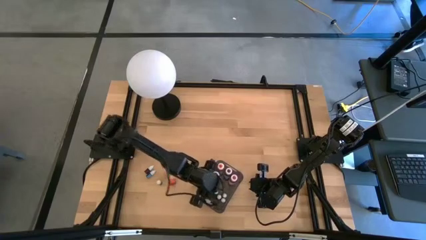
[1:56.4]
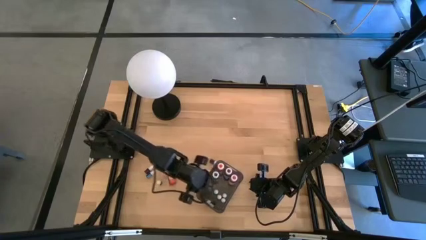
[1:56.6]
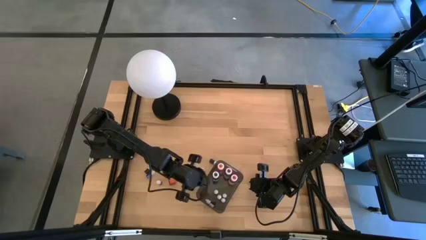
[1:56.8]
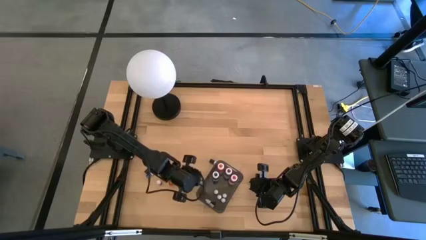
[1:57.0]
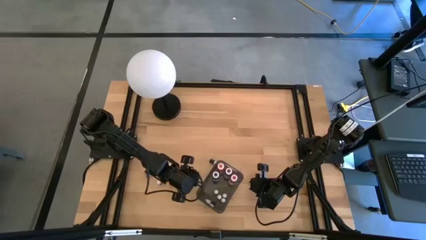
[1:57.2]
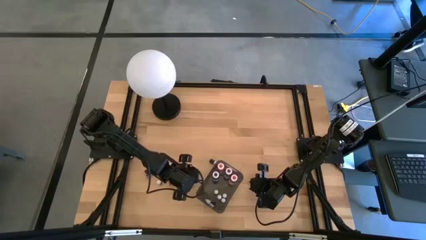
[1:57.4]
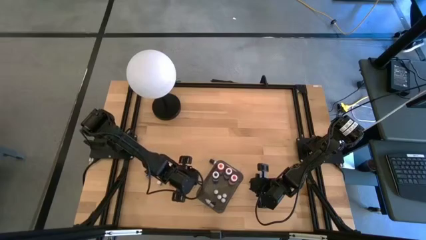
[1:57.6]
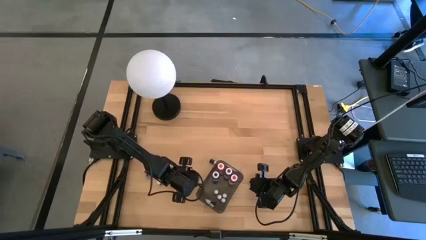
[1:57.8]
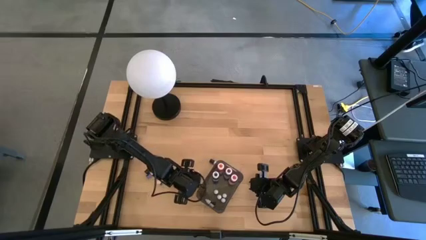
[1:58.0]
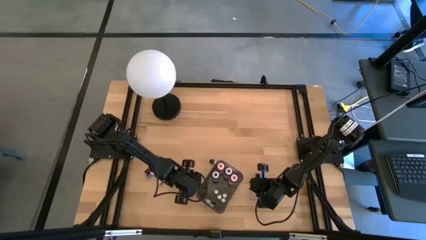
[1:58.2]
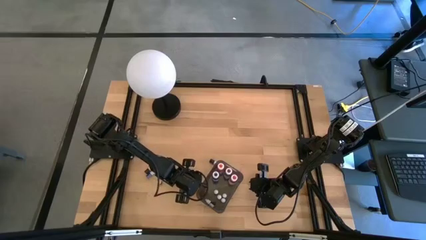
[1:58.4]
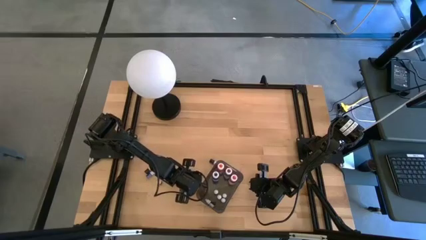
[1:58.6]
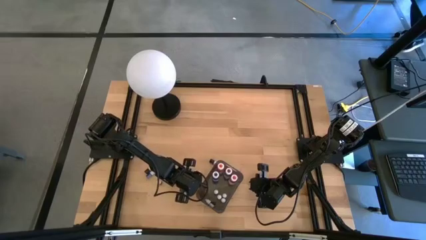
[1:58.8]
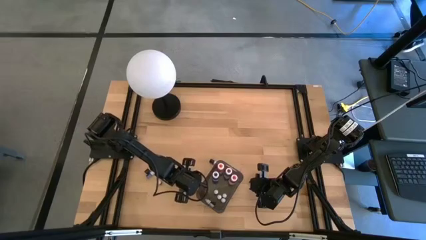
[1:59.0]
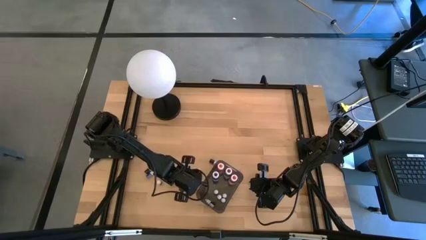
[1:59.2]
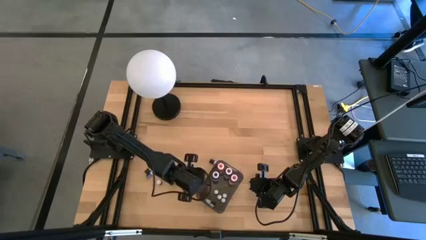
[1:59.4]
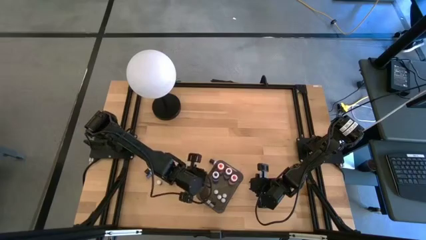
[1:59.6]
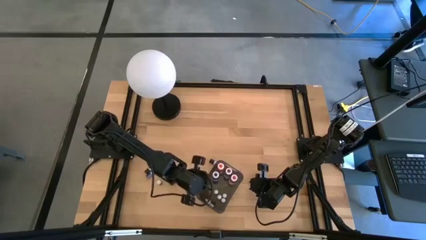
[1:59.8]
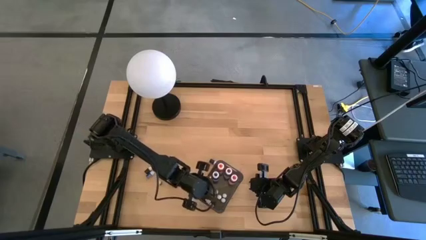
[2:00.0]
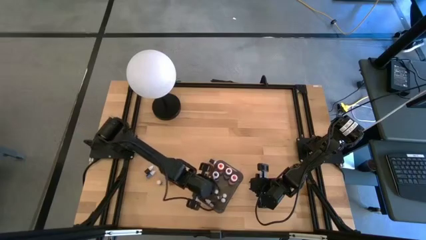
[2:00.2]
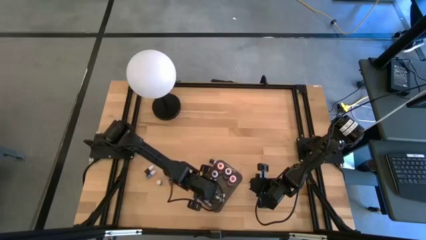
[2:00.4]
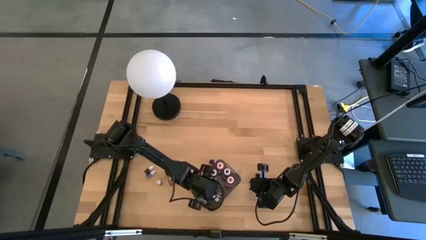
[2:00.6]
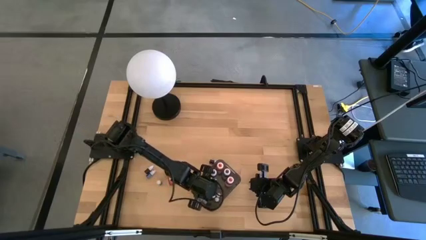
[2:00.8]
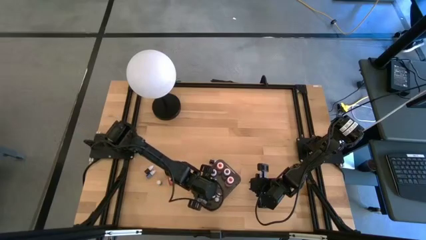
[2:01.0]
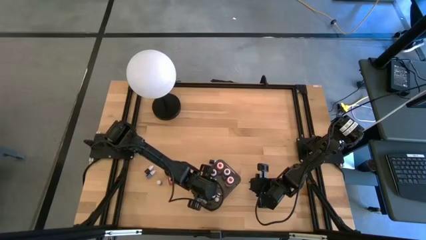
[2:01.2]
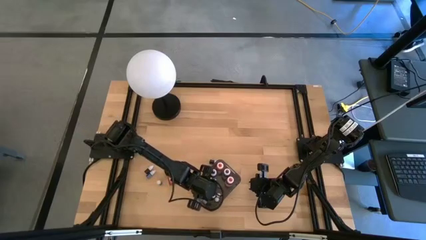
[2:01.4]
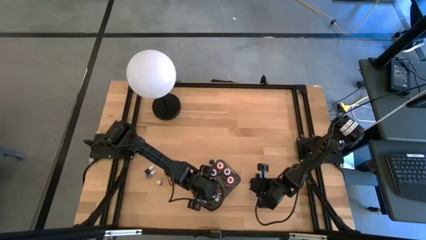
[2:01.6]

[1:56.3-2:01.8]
Task: Pick & Place food coloring
Put the small food coloring bottle into the black bin

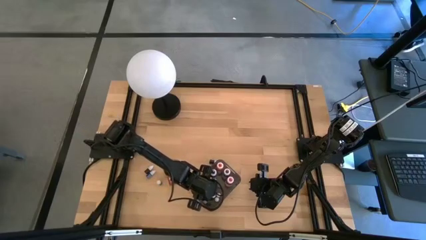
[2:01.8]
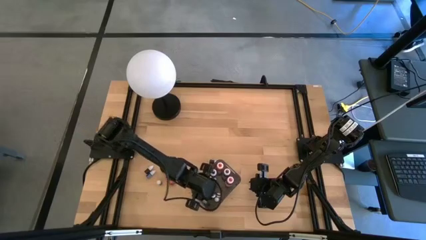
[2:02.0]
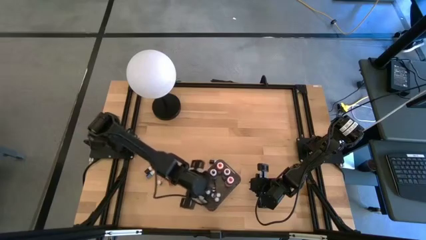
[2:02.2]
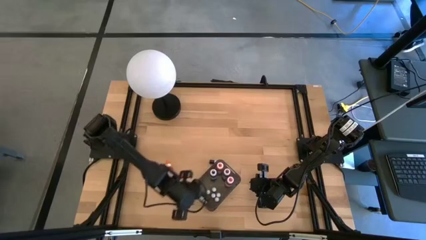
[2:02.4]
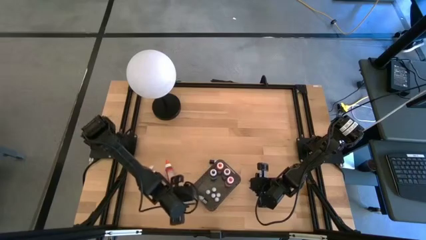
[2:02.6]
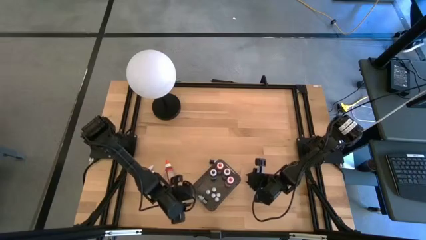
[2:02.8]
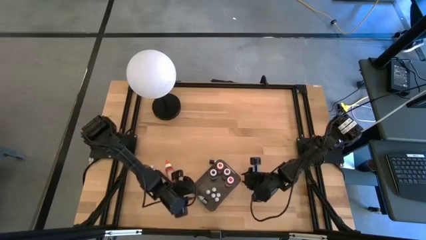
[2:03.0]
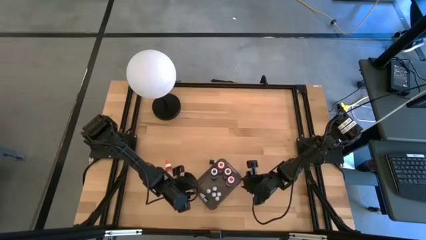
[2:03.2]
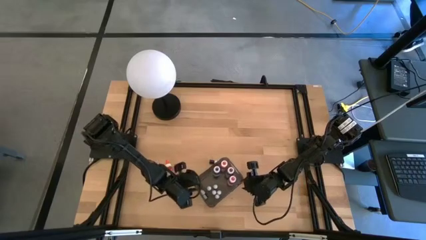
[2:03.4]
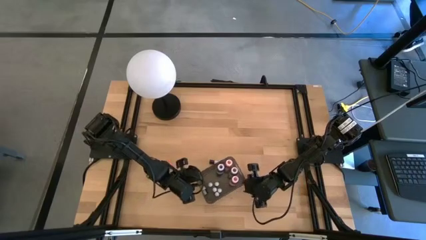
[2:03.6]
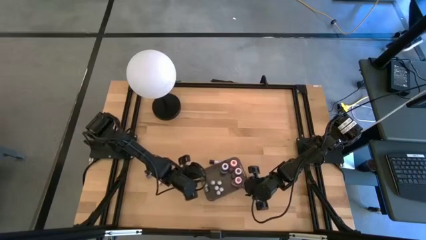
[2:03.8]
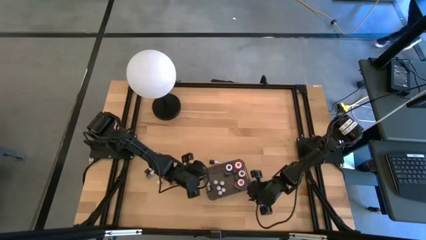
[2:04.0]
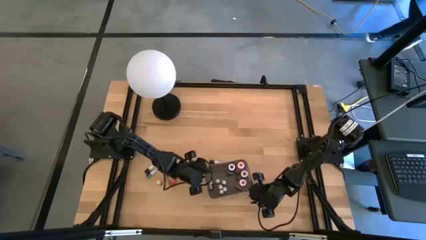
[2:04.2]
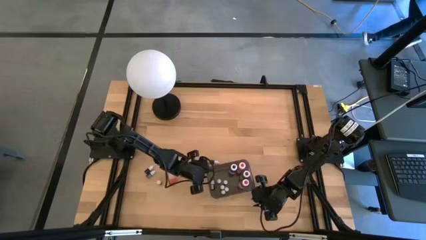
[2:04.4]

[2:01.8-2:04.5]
Adjust the black bin on the table

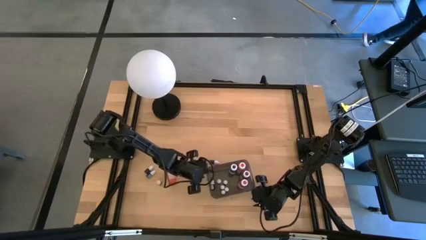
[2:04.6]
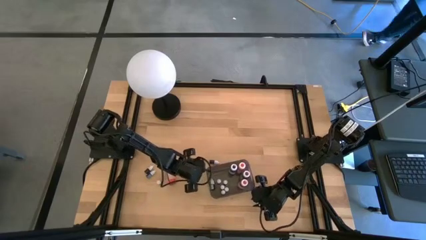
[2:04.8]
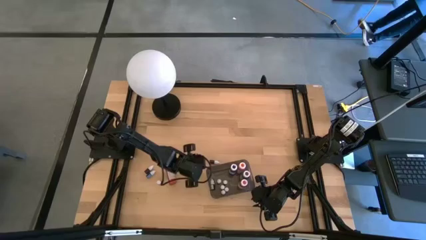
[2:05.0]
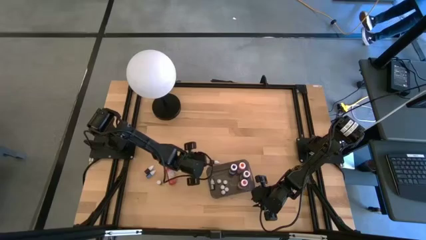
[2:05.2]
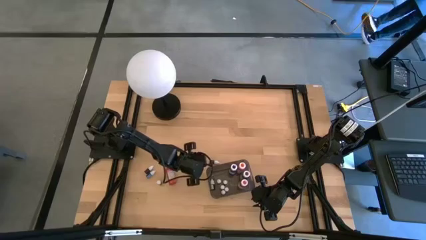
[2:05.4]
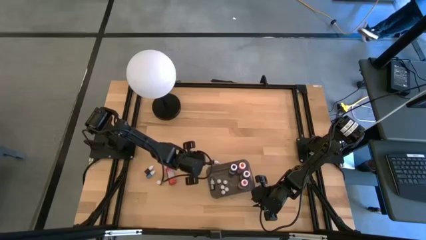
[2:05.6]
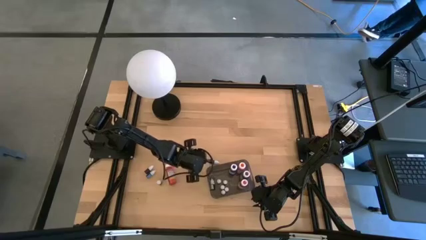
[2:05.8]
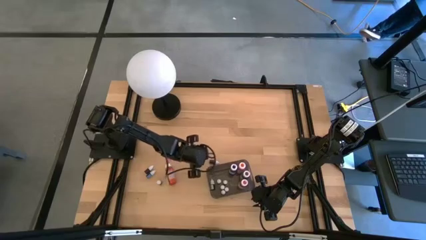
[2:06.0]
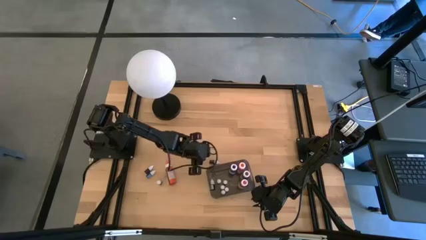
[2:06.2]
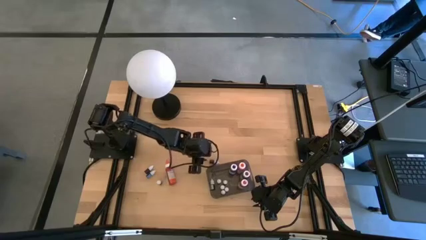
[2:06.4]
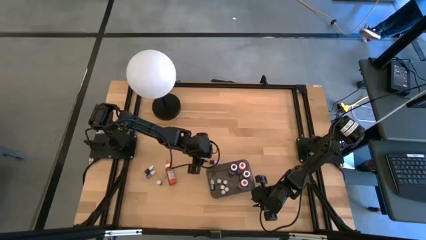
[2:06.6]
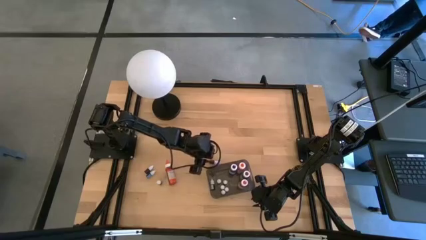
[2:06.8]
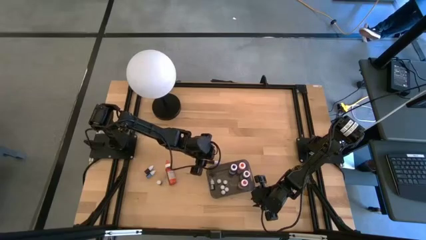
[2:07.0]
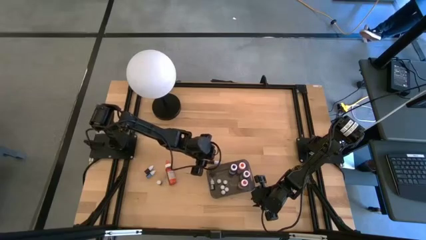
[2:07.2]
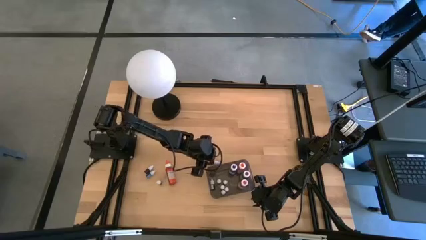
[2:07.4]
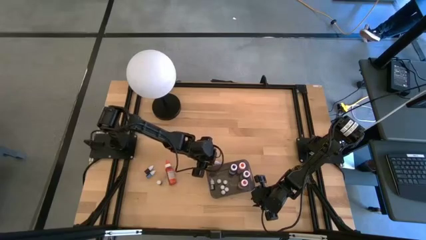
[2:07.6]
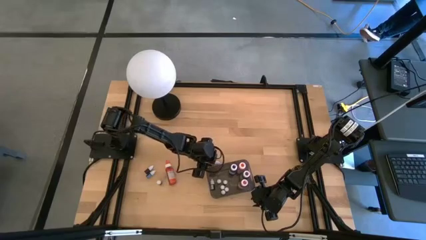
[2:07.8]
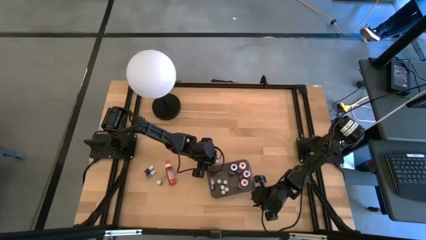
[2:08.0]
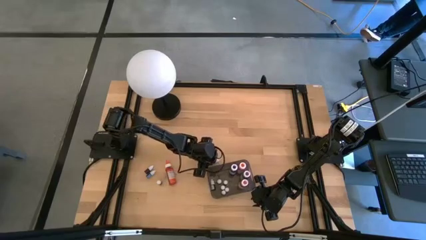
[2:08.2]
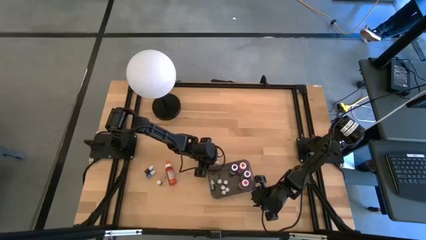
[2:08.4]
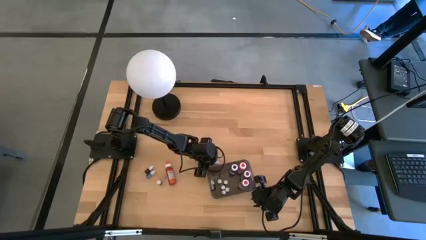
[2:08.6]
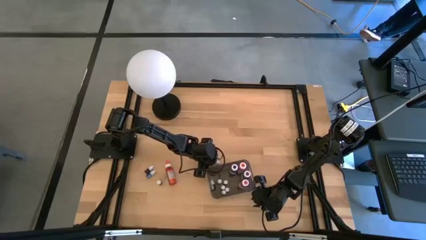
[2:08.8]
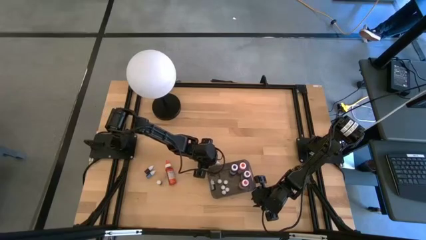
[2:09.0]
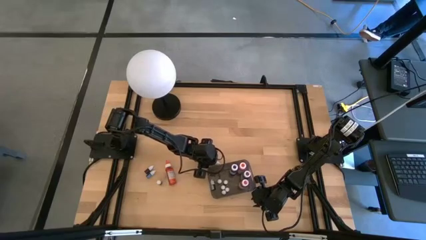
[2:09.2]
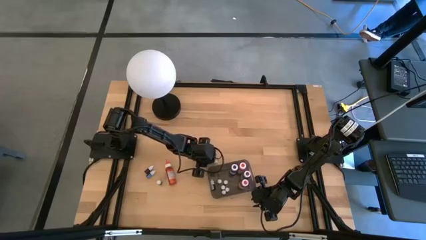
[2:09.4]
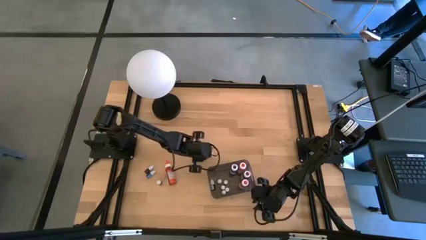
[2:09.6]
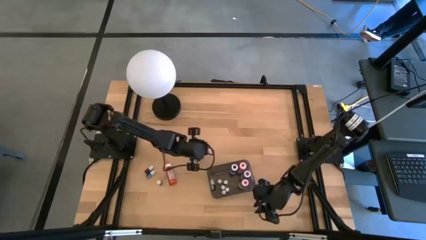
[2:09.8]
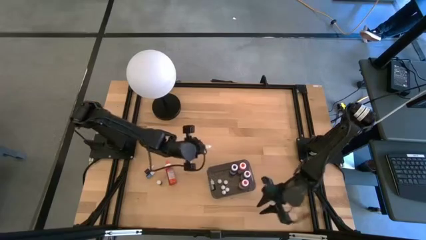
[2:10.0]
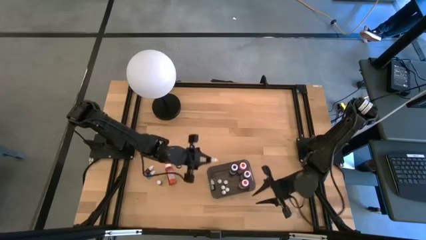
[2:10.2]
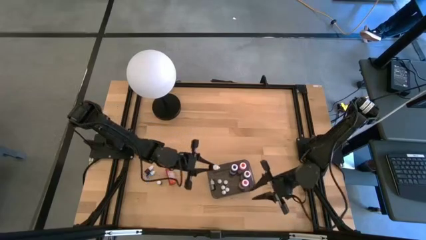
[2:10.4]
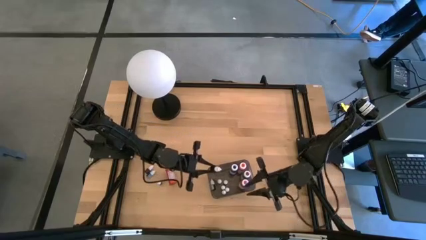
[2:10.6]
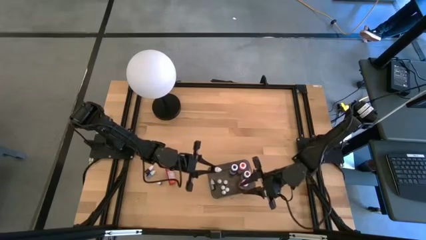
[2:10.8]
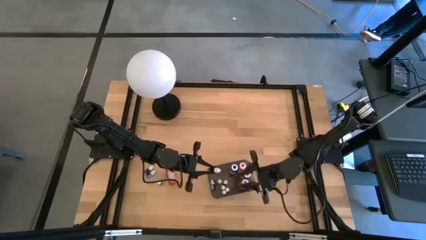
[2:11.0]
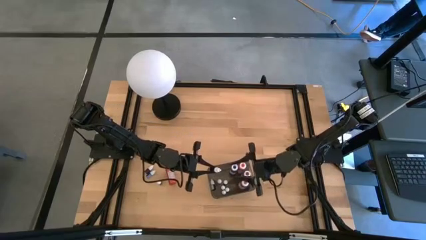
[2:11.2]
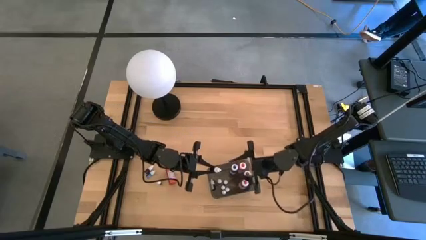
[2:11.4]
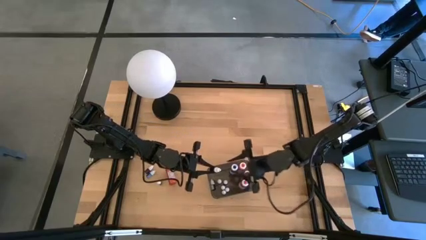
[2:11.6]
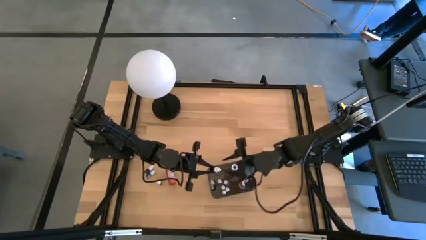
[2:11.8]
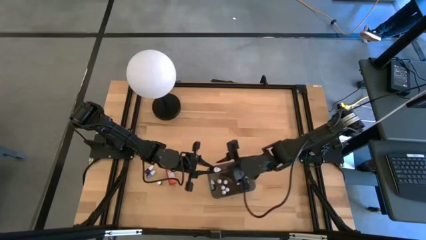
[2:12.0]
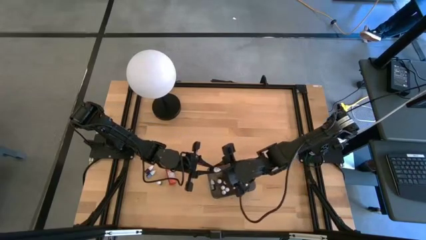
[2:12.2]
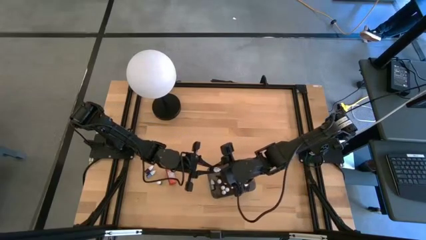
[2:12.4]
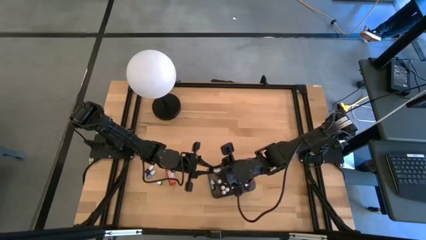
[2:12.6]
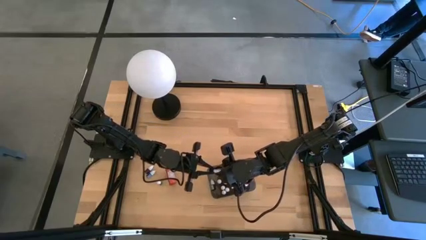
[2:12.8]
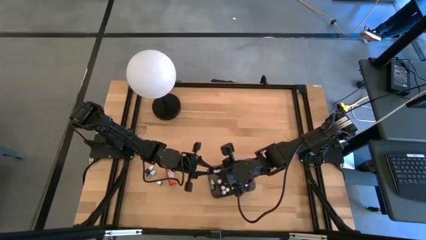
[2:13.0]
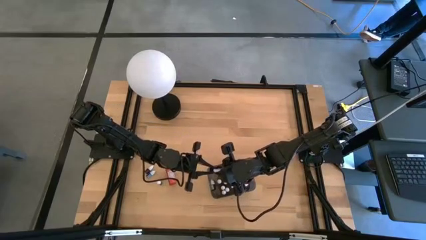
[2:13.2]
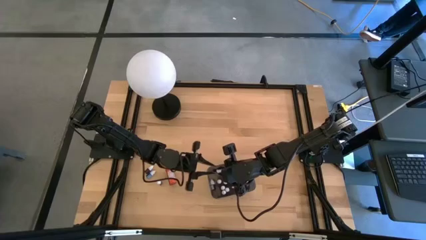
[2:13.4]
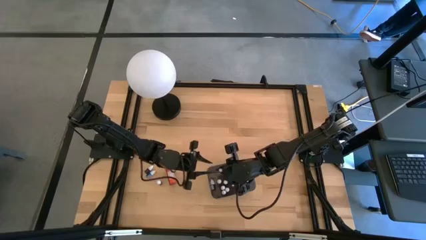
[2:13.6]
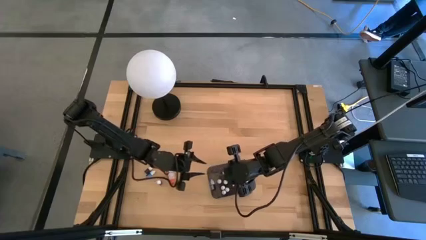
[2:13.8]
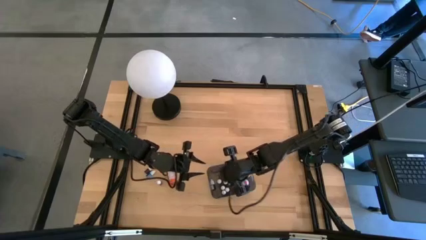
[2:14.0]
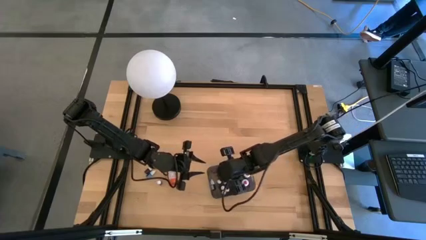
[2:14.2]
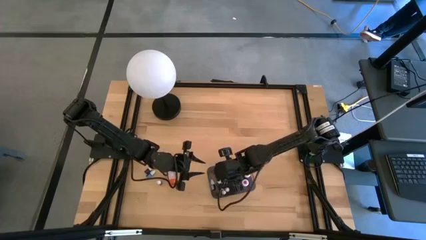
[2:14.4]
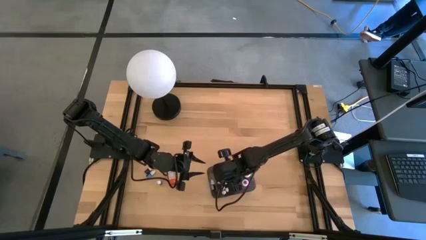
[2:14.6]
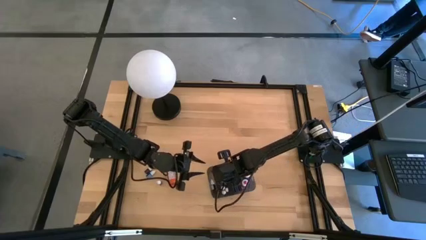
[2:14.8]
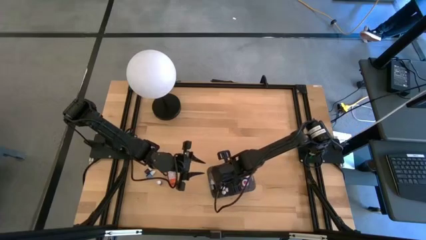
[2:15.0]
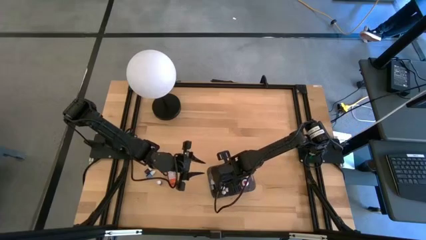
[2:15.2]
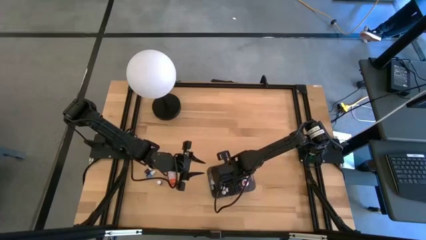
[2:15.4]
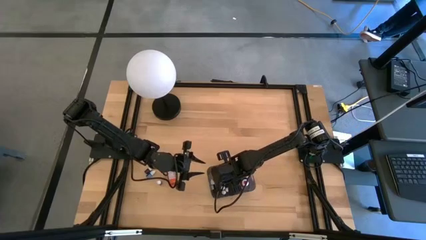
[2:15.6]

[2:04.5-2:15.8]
Put the small food coloring bottle into the black bin
